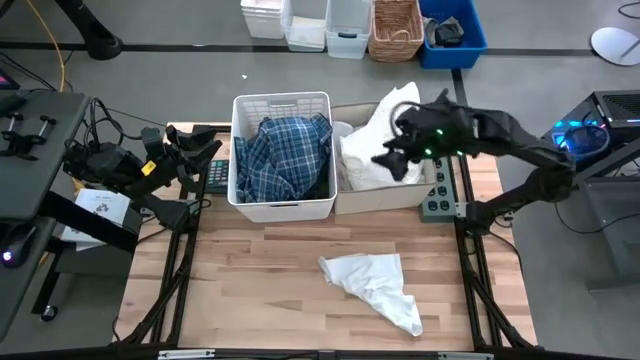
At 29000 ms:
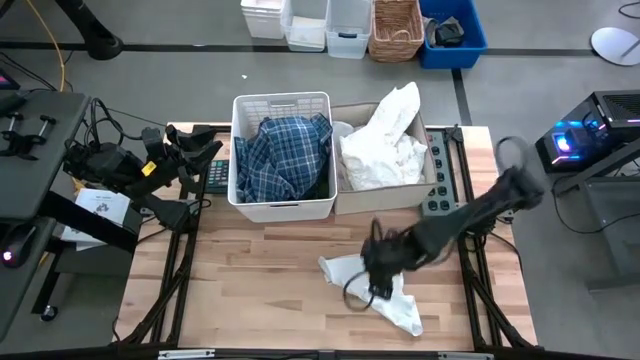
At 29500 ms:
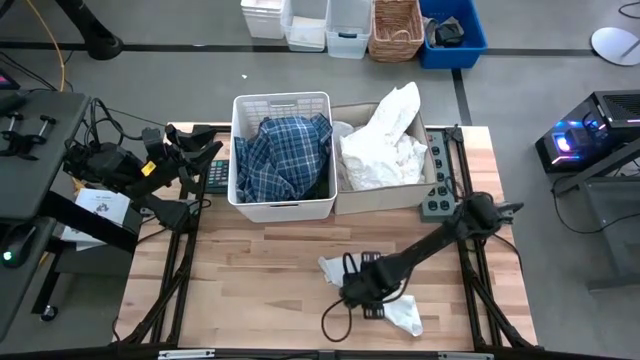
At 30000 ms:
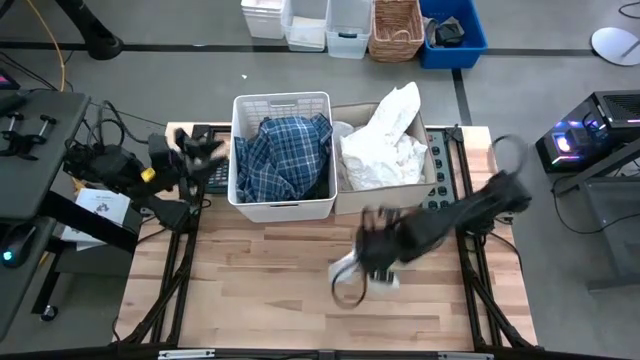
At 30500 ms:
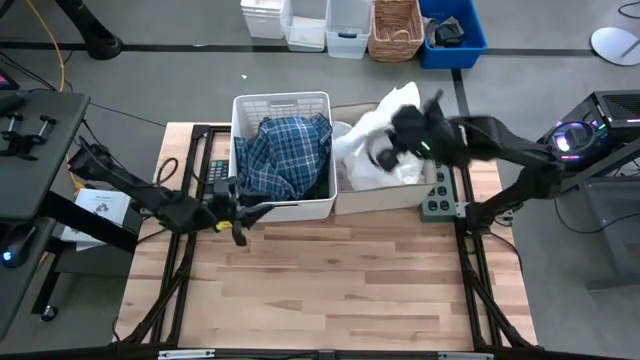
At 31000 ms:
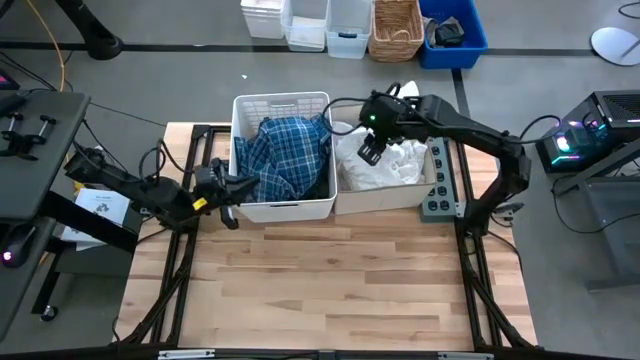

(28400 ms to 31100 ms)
Task: Sort clothes
Put the white short into the laundry organizer

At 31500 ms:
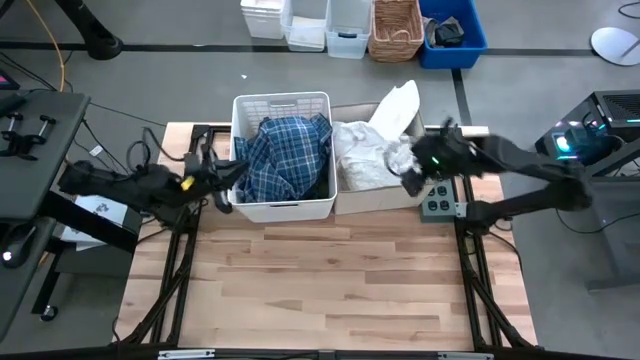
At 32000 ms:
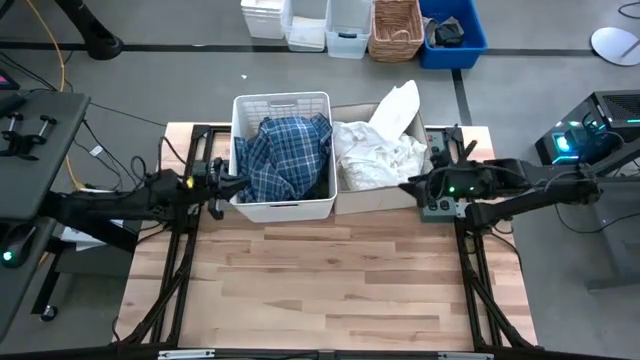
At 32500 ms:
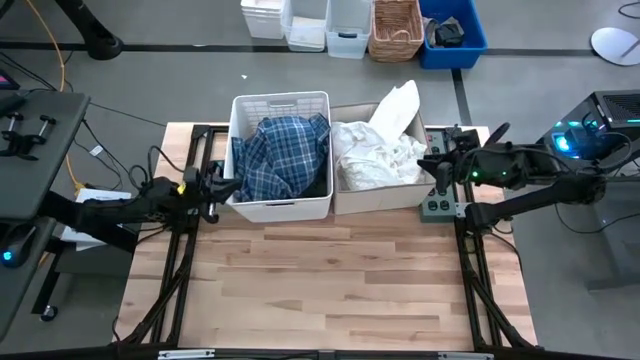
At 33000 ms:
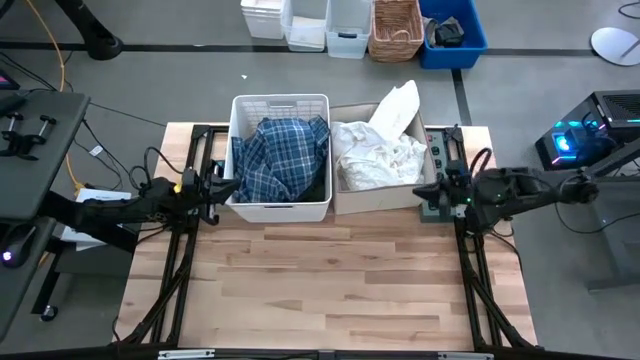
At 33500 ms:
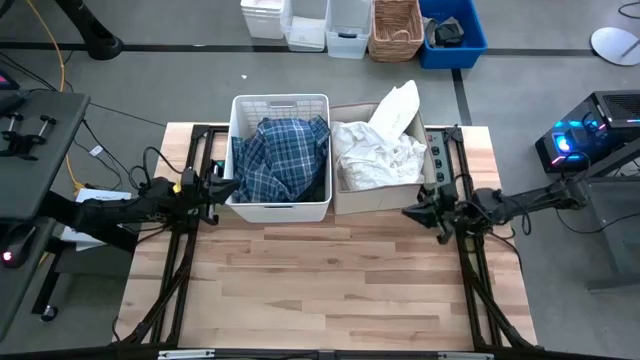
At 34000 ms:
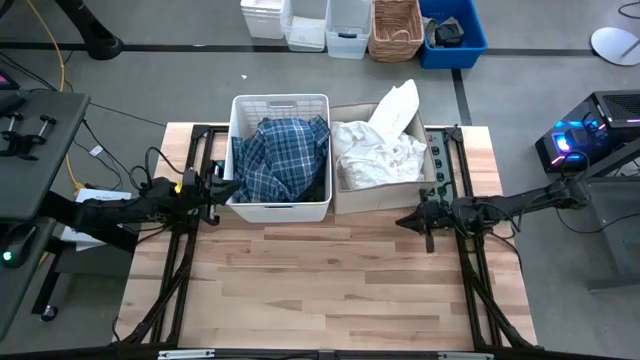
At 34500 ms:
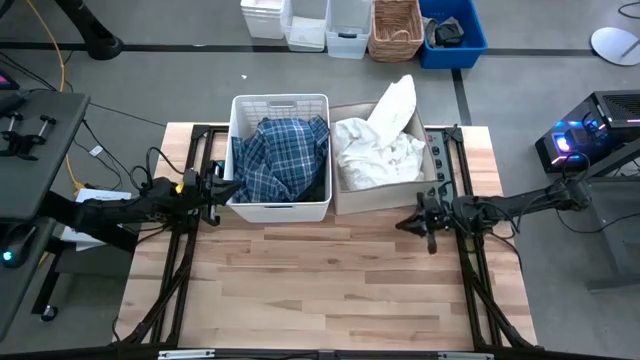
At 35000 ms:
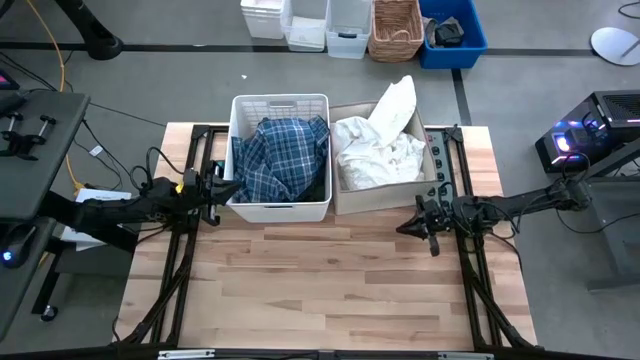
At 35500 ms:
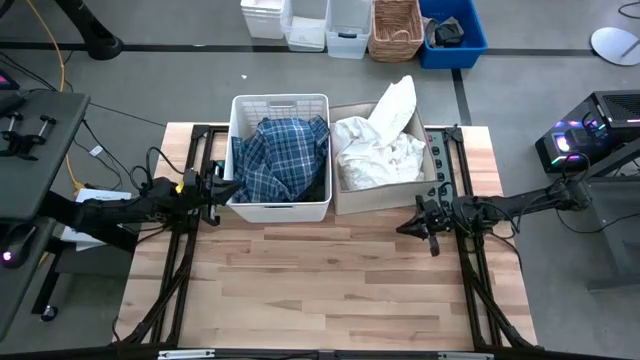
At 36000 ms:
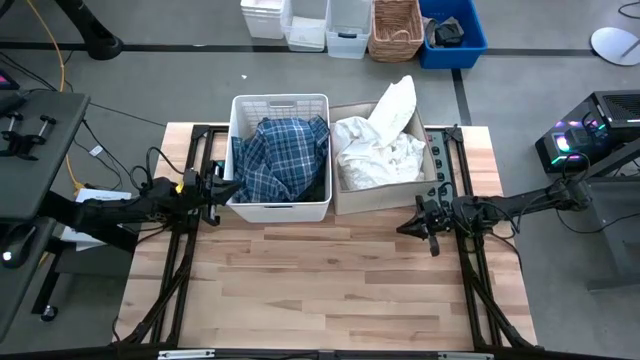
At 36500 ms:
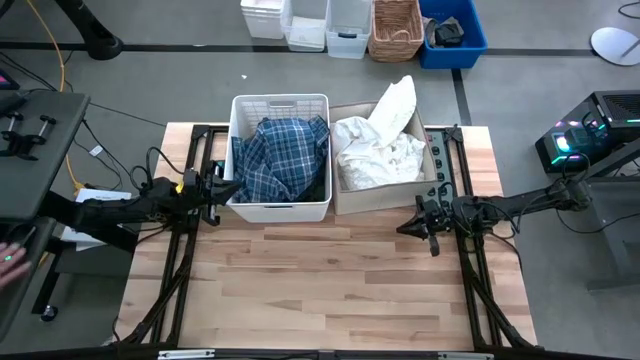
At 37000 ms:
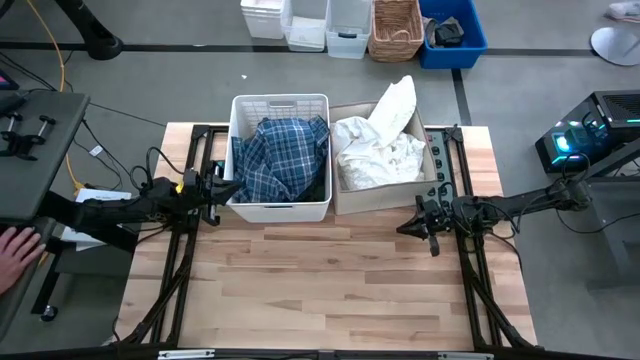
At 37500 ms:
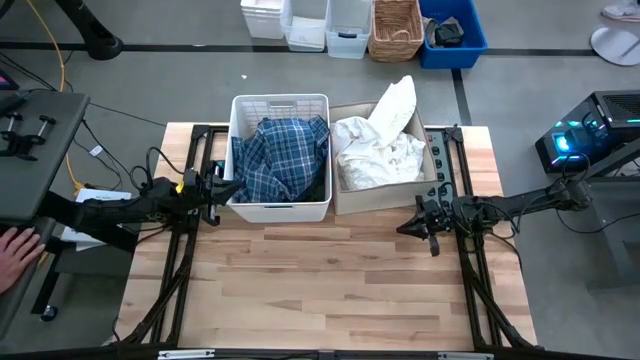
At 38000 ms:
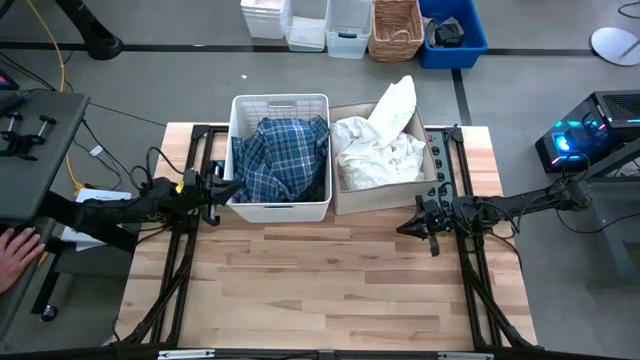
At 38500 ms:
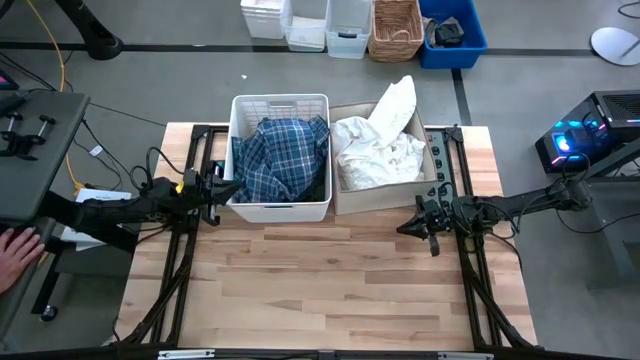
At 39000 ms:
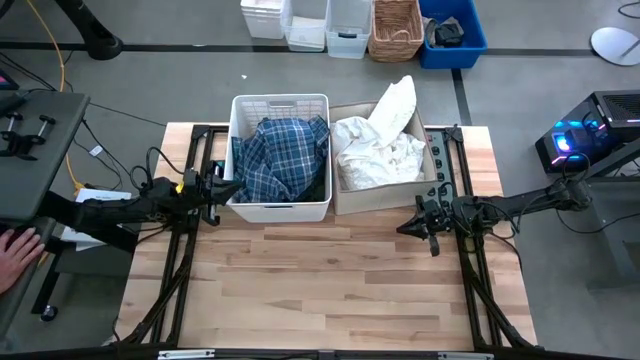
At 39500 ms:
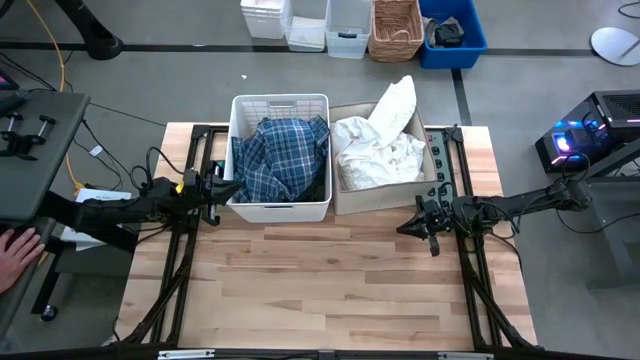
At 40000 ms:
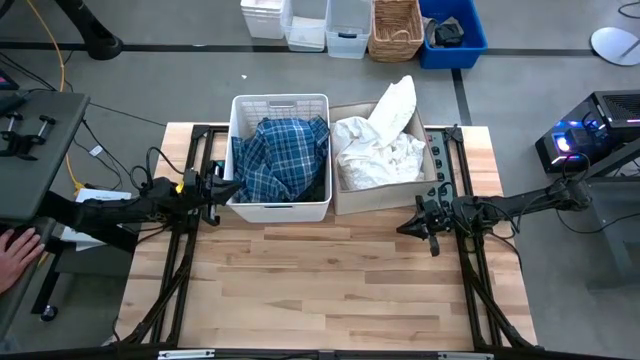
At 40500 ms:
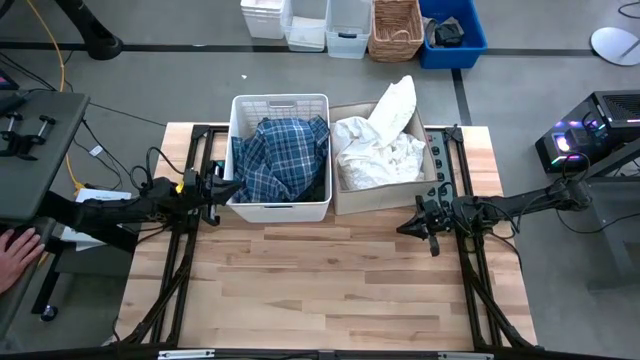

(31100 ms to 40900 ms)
Return to Home Position

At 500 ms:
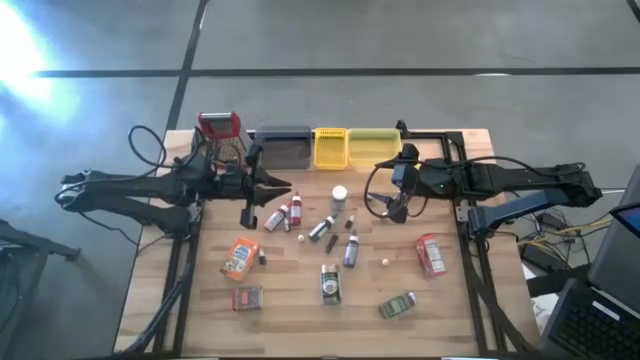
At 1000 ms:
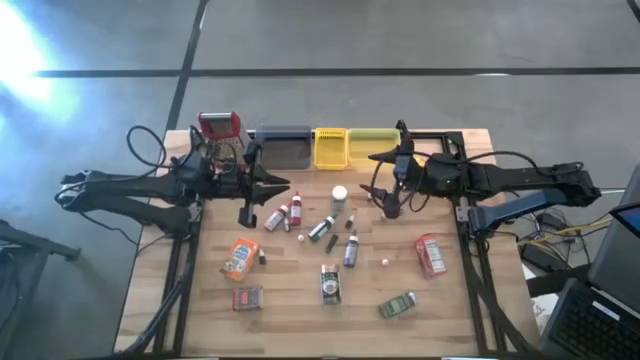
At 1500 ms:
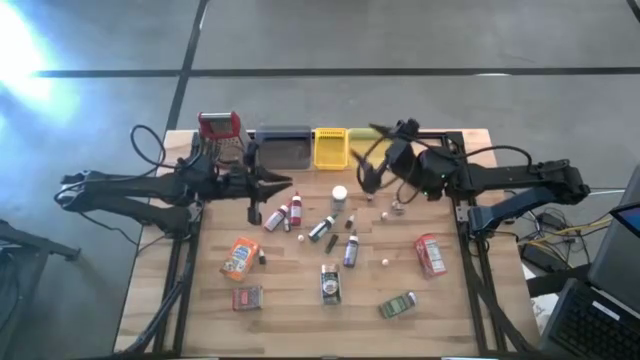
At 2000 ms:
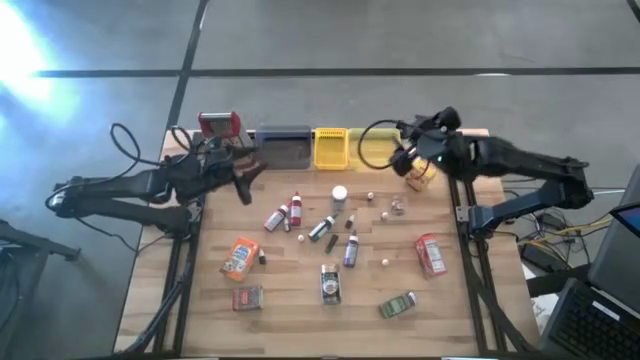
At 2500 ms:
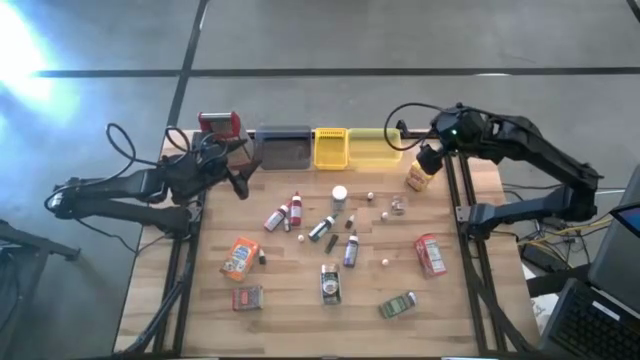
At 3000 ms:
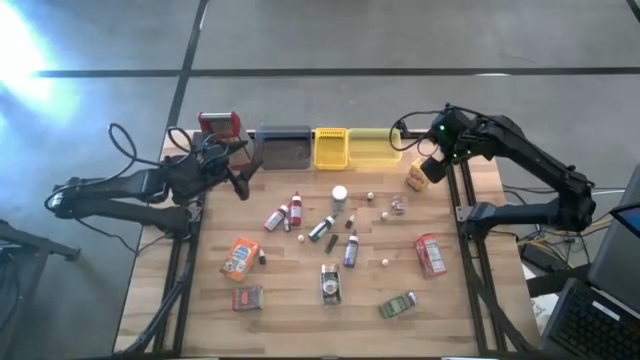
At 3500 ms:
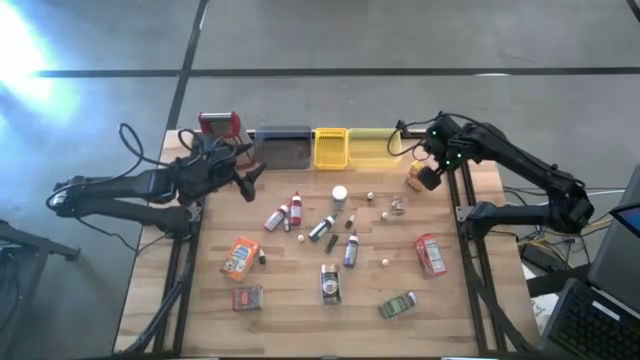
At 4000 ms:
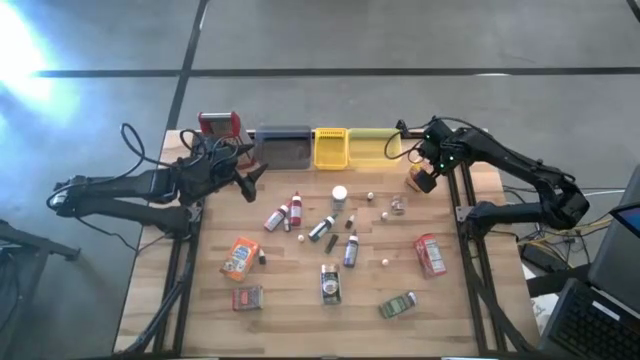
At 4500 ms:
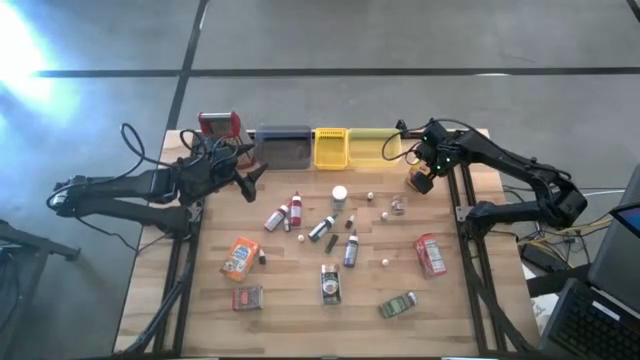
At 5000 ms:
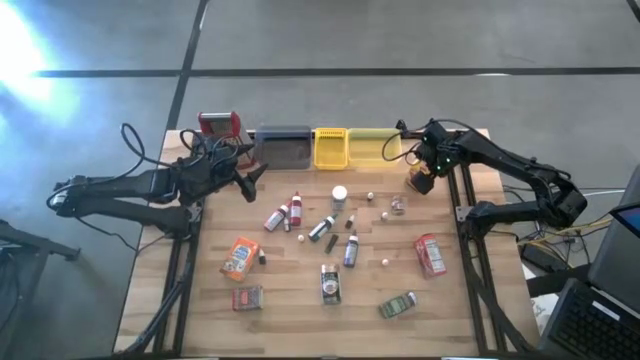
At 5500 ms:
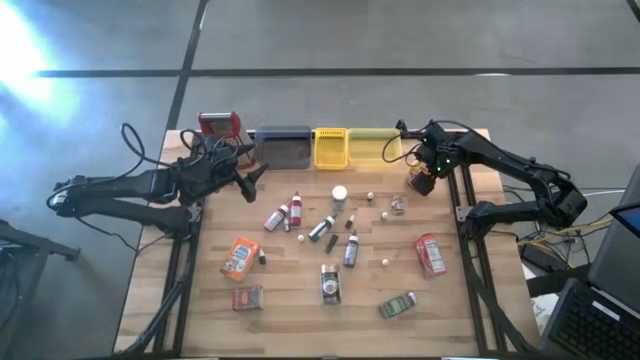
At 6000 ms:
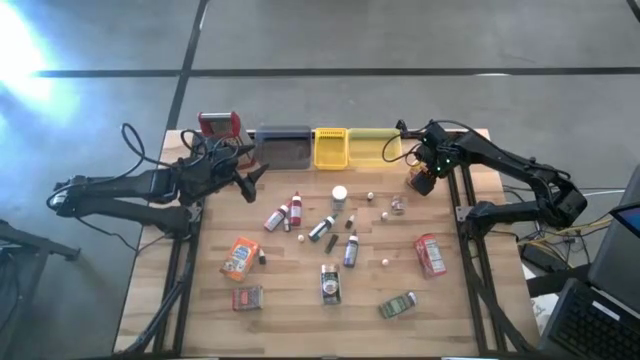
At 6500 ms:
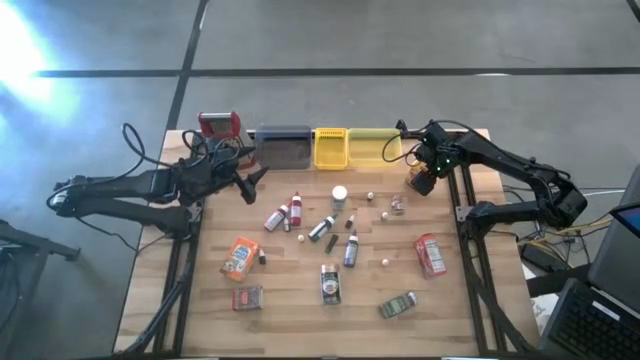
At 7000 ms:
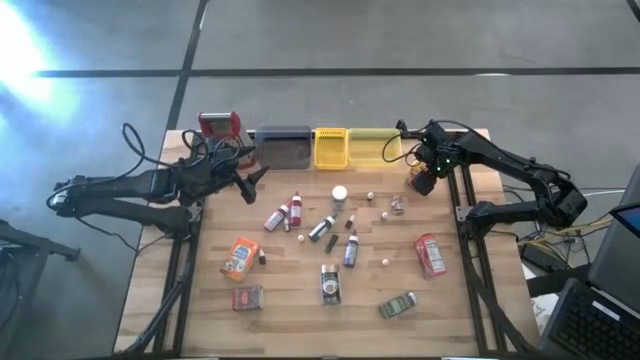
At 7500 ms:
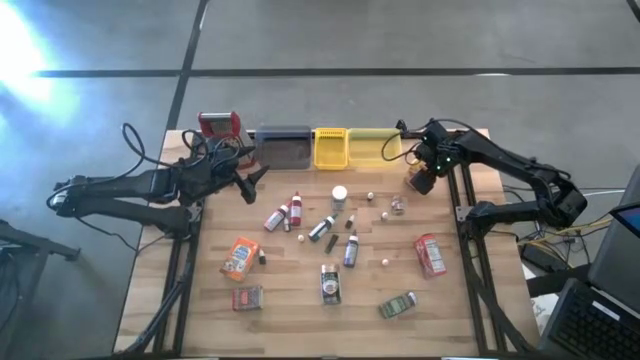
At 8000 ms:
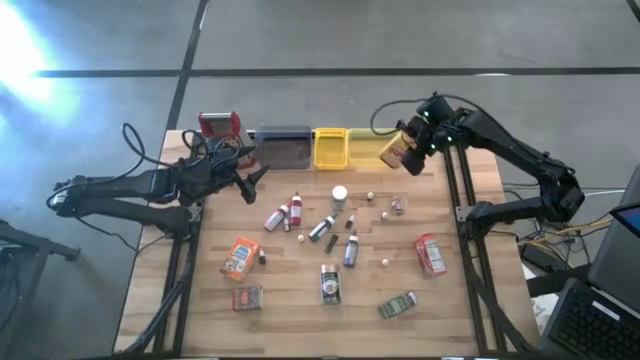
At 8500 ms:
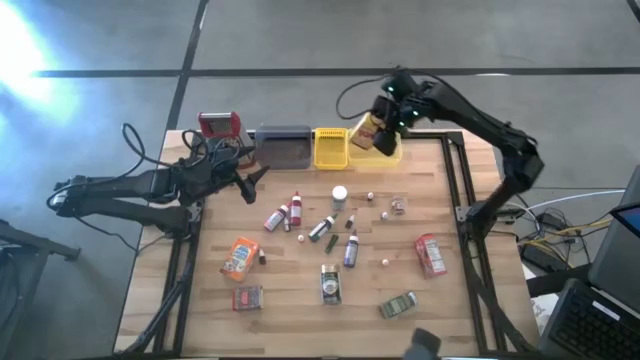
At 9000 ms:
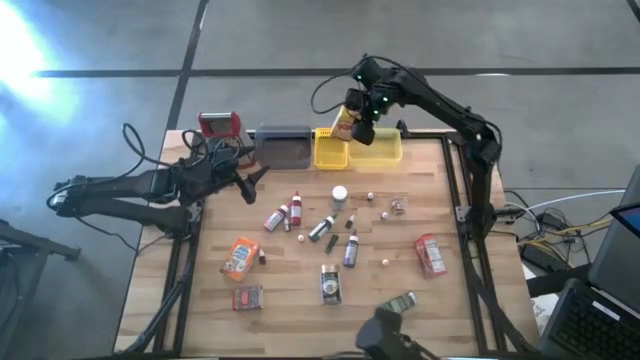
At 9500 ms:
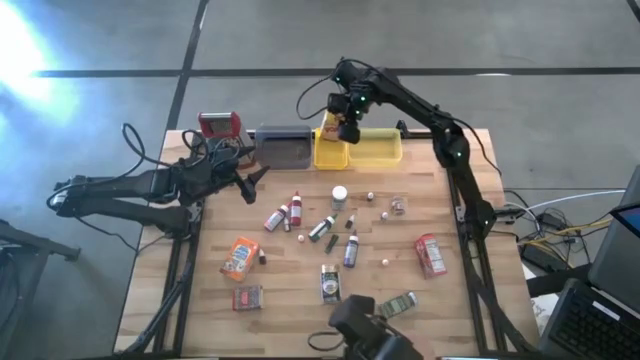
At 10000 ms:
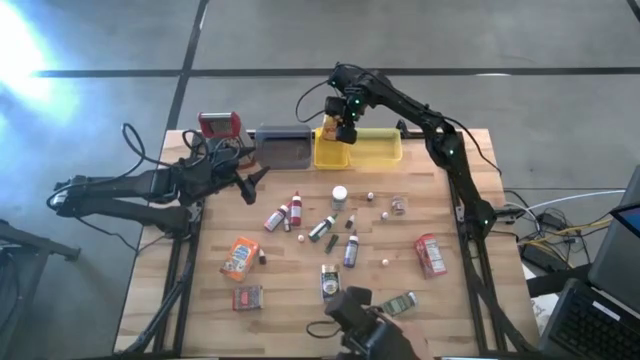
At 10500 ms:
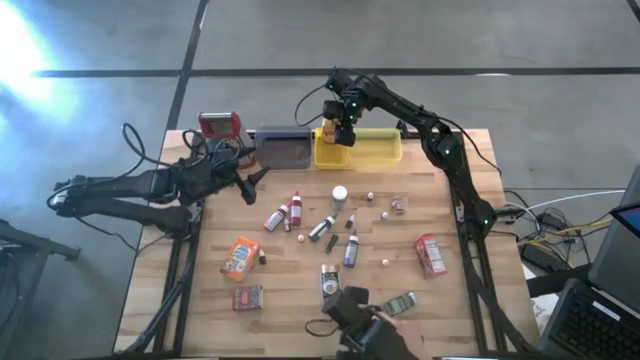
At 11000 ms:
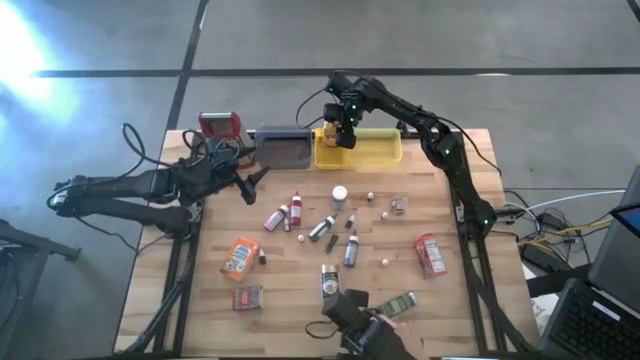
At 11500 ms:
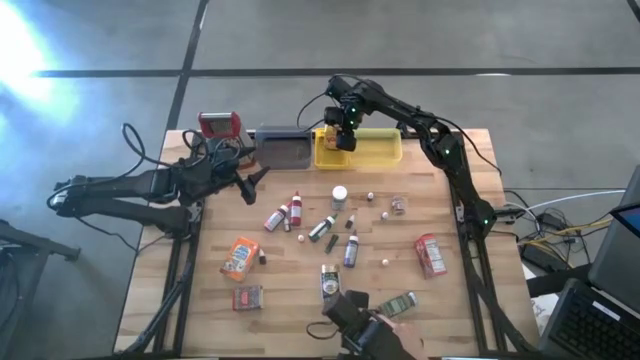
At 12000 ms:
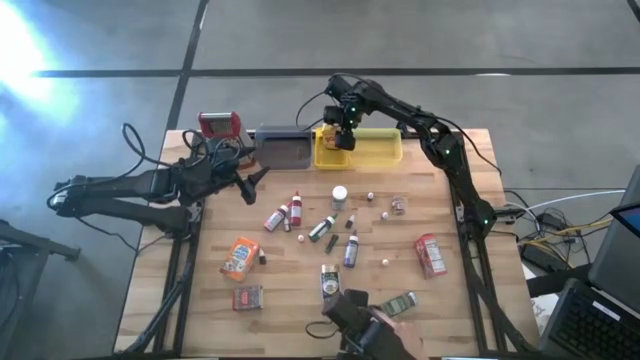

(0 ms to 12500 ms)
Task: Pick & Place Kitchen Items
Put the yellow cereal box into the yellow bin
